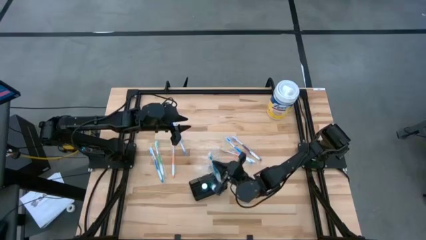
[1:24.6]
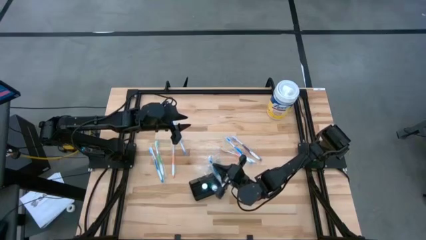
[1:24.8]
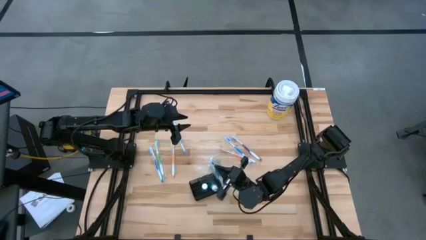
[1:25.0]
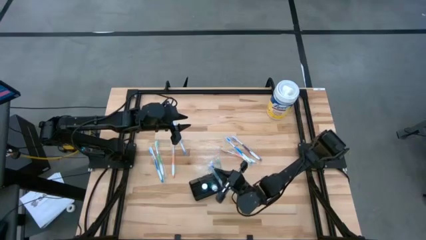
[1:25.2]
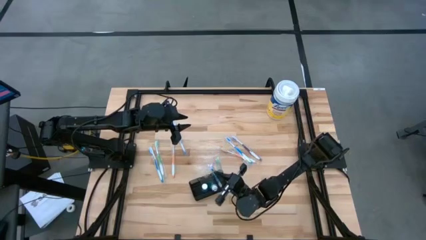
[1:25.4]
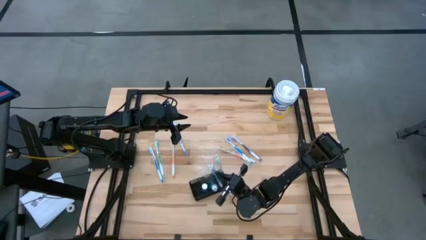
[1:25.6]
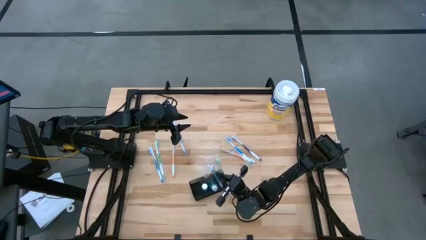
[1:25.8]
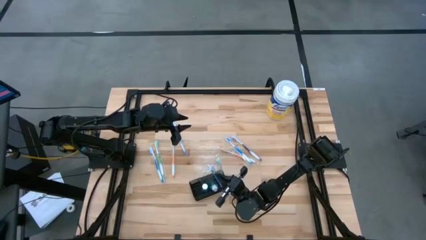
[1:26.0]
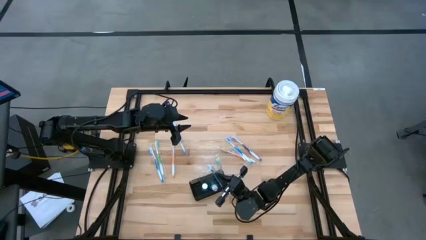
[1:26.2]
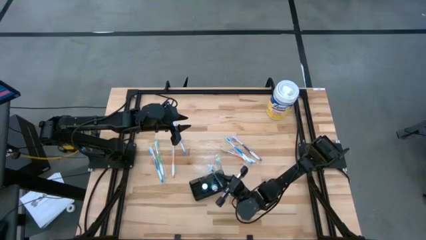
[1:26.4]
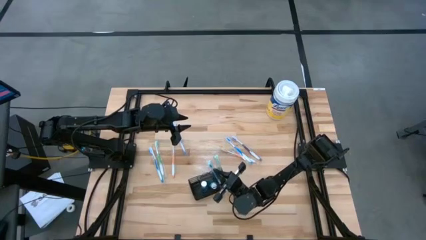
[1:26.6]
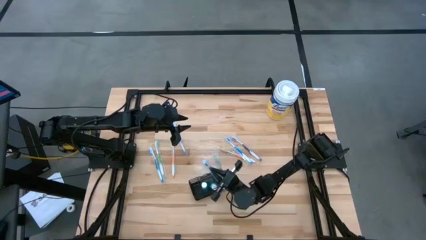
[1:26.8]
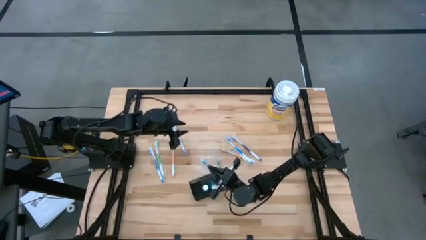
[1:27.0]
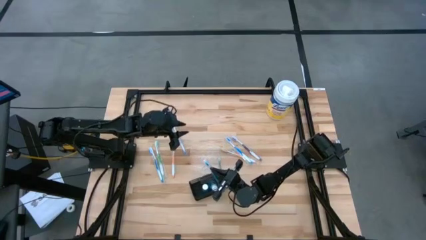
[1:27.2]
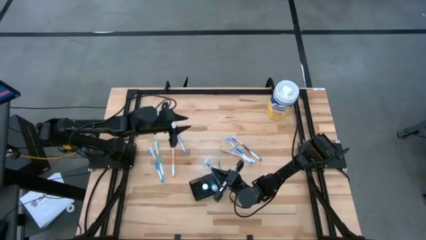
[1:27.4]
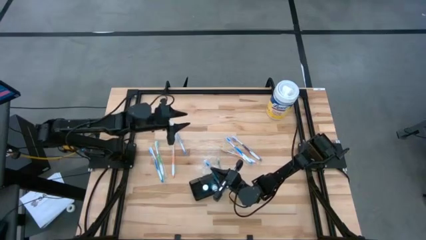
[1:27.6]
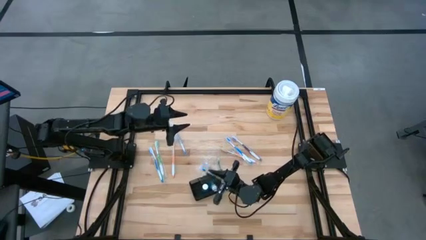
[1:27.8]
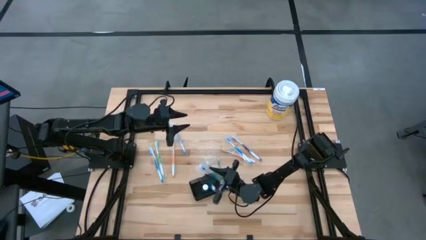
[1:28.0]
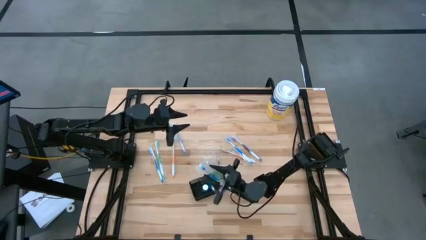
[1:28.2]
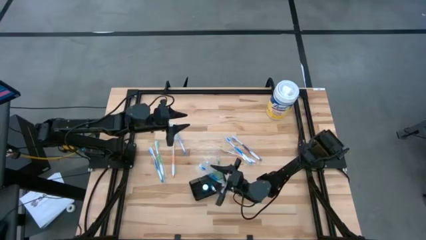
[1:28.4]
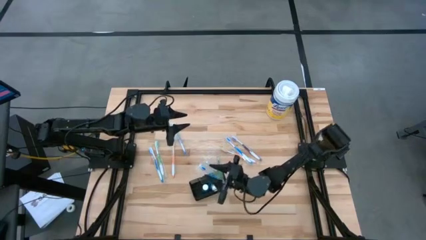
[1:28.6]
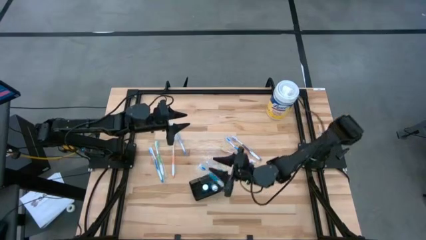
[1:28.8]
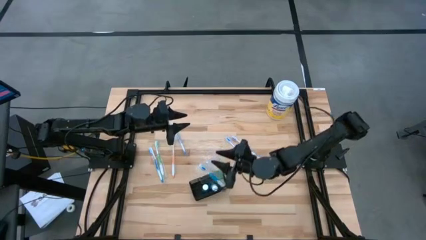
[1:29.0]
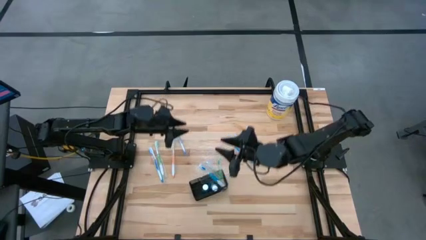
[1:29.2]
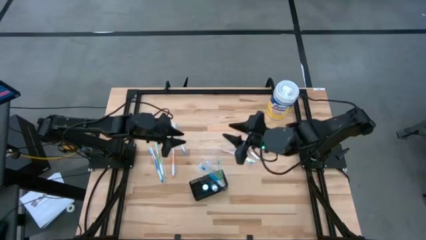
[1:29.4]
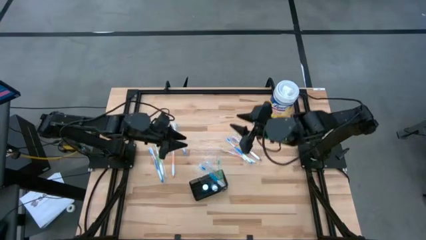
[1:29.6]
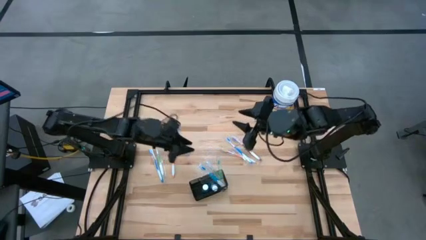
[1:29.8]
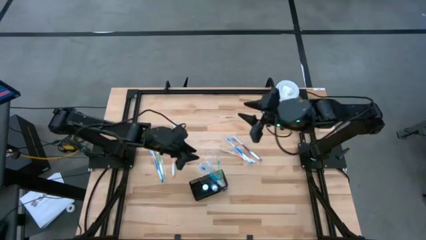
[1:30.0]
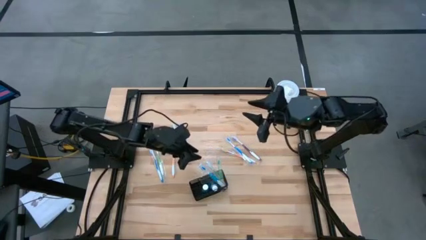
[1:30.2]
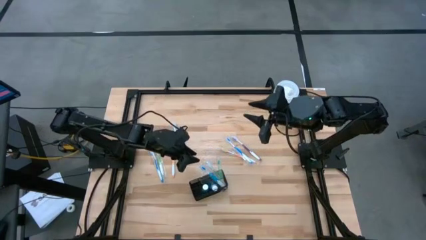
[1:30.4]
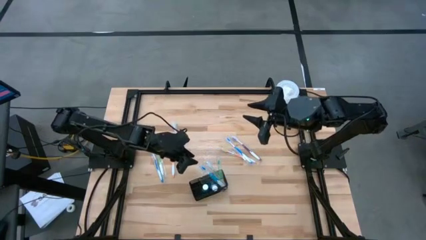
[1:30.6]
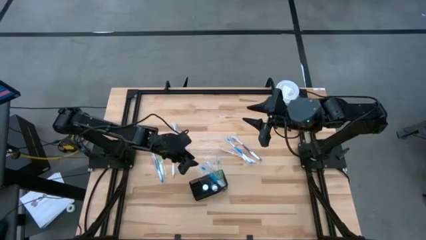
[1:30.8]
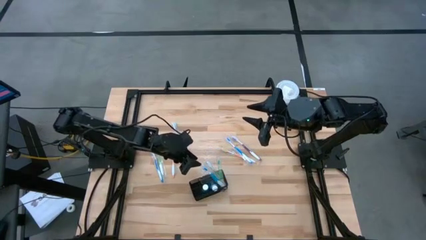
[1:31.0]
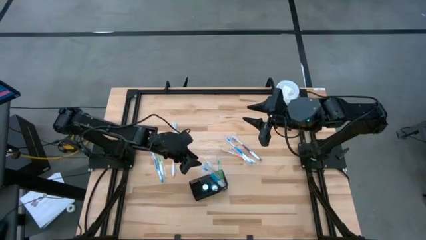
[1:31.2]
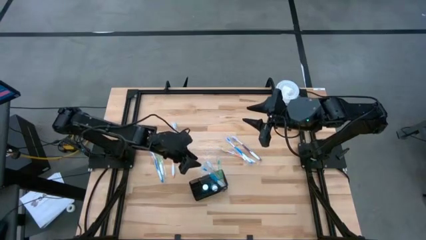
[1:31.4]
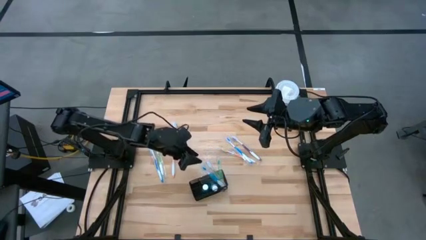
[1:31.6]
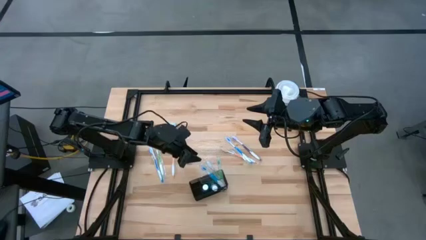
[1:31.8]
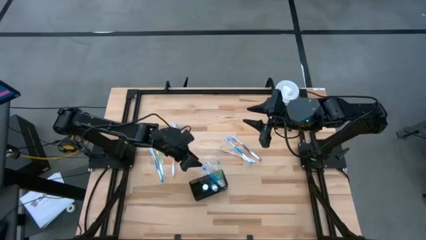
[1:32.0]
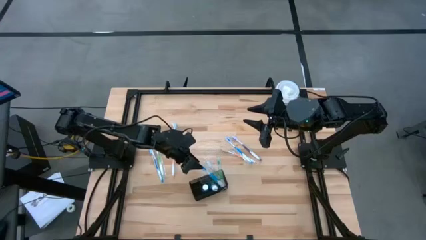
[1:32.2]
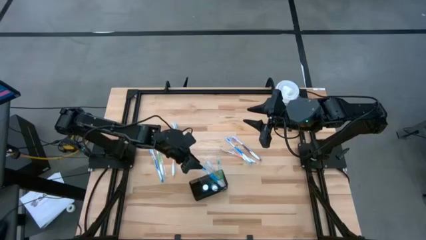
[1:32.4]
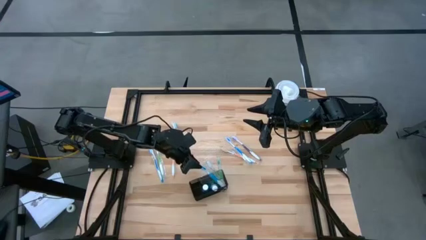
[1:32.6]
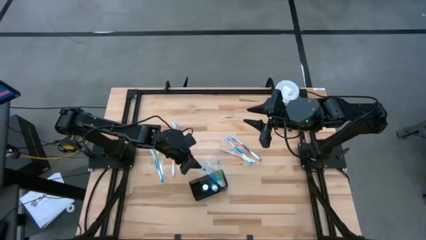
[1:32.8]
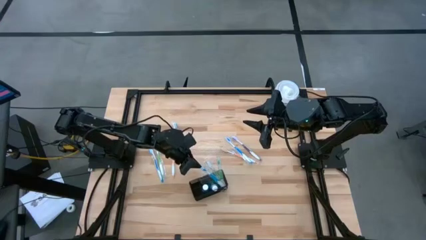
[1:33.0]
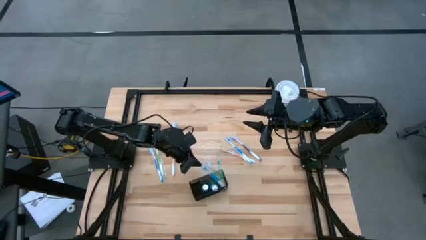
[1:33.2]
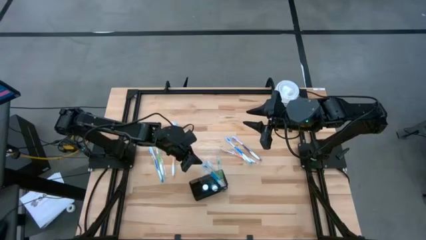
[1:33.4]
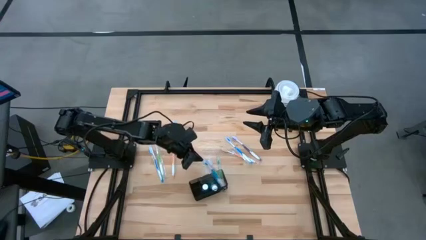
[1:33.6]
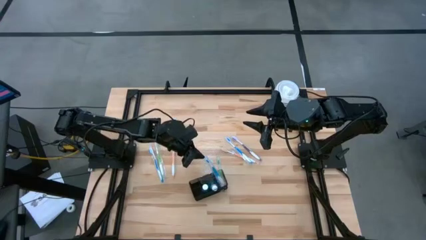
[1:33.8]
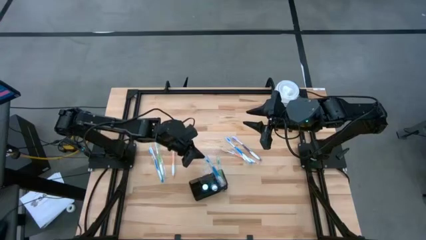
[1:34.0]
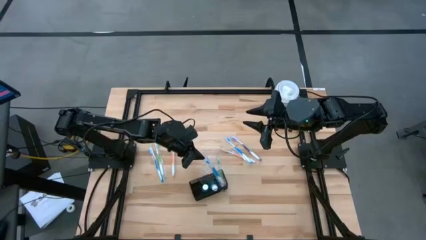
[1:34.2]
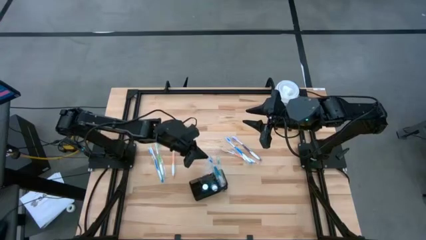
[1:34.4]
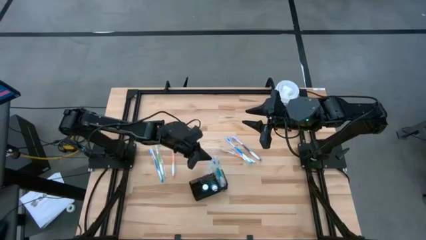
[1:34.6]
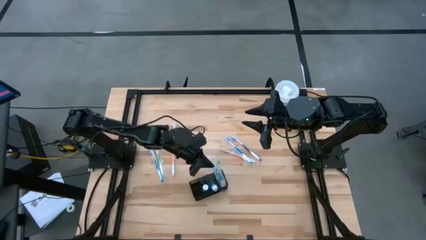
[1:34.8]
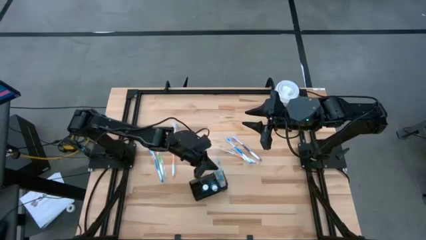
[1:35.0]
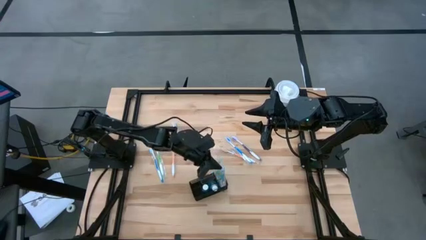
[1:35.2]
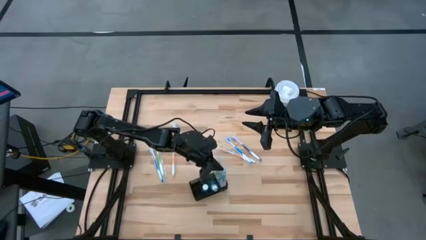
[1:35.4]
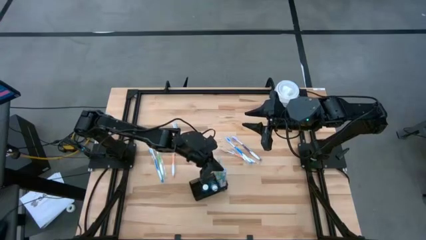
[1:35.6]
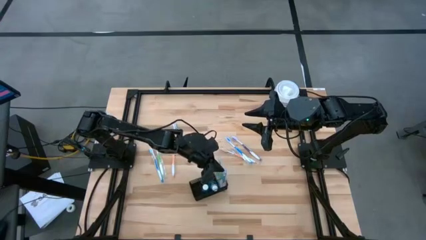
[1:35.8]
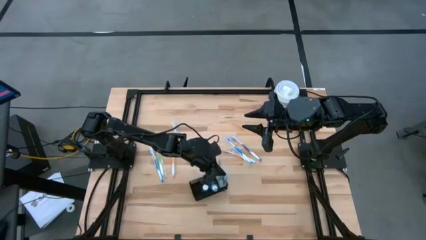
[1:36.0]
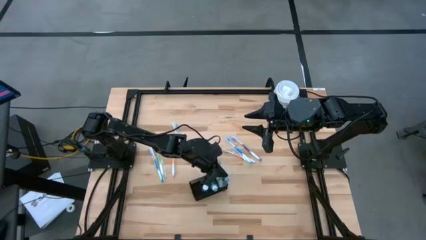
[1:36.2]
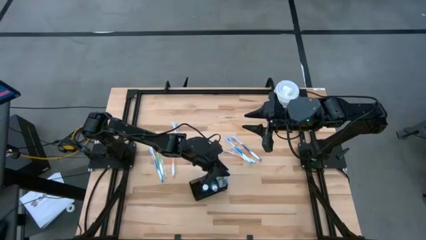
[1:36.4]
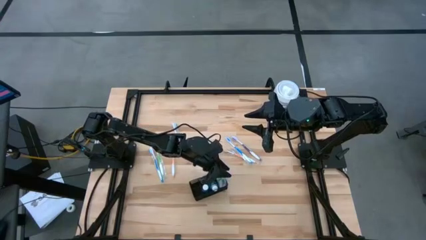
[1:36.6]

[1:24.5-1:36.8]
Task: Pick & Place toothbrushing station
Put the blue toothbrush into the mesh organizer

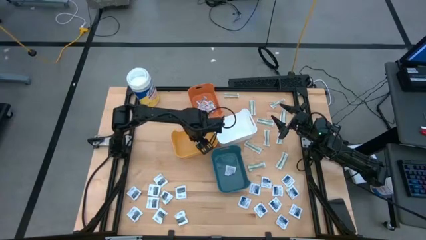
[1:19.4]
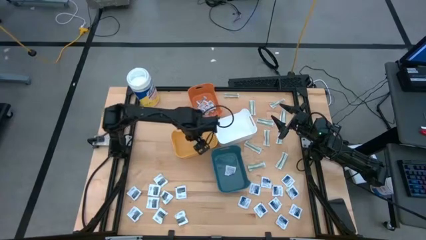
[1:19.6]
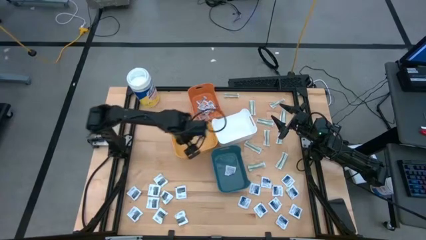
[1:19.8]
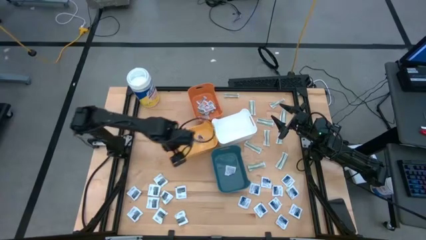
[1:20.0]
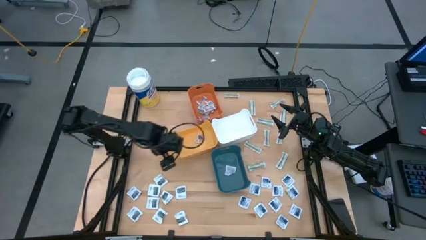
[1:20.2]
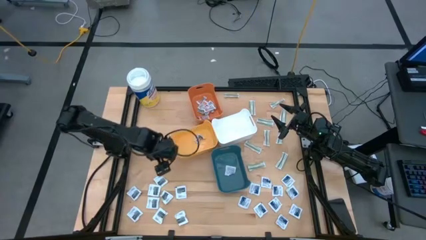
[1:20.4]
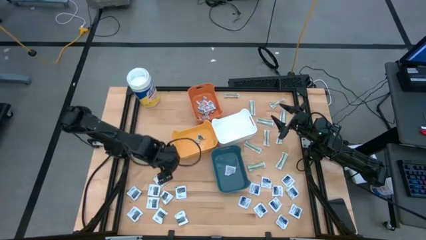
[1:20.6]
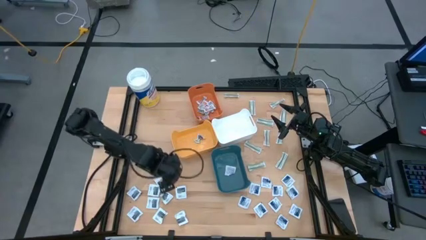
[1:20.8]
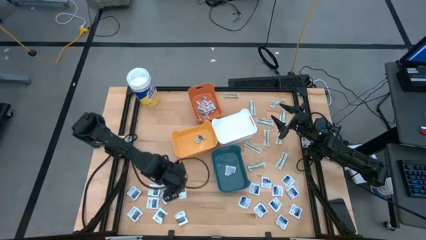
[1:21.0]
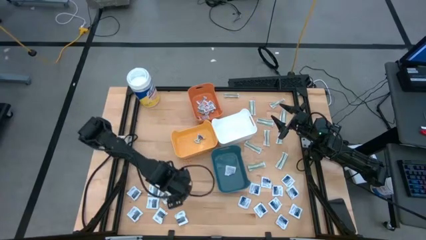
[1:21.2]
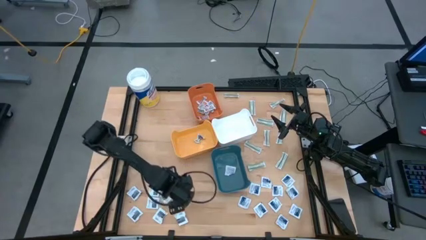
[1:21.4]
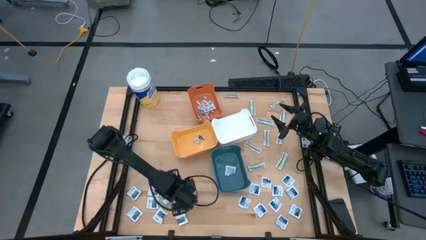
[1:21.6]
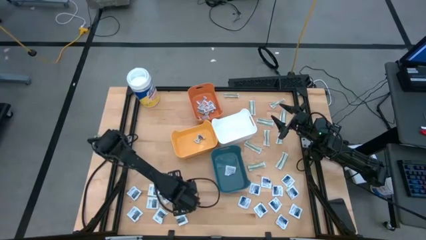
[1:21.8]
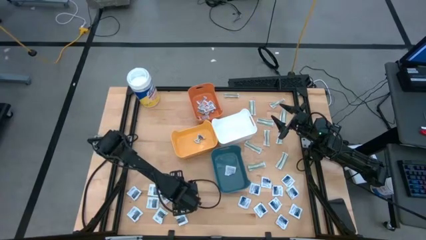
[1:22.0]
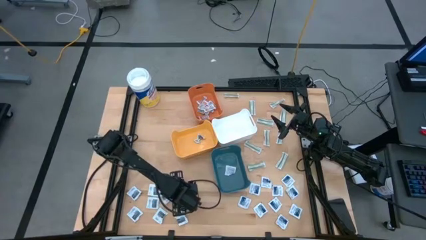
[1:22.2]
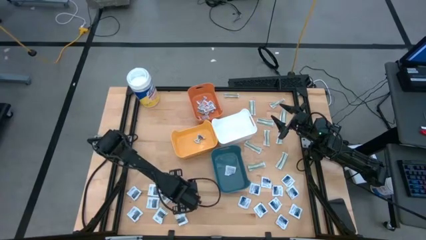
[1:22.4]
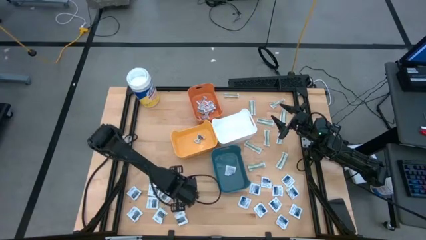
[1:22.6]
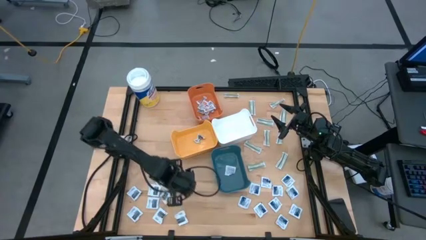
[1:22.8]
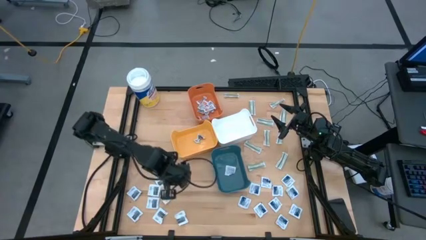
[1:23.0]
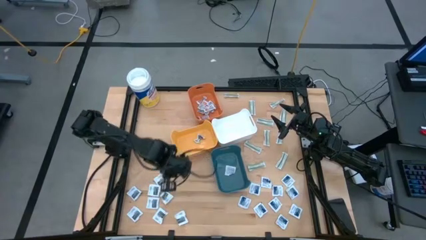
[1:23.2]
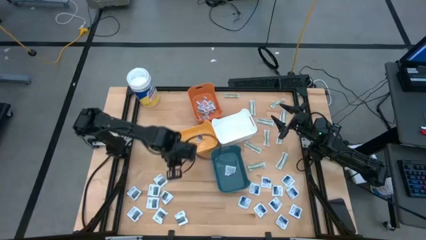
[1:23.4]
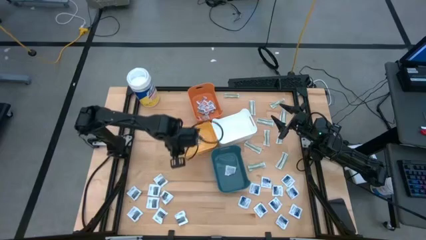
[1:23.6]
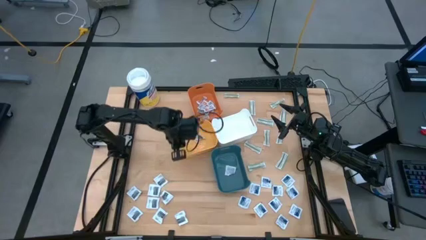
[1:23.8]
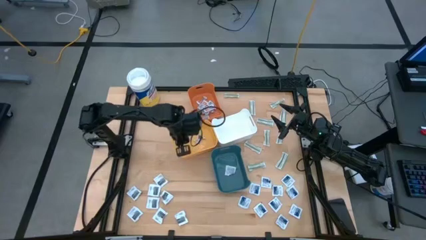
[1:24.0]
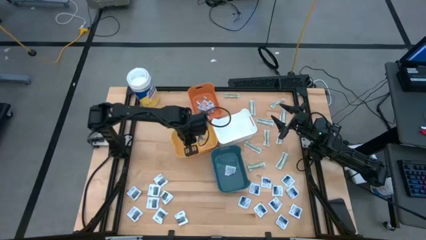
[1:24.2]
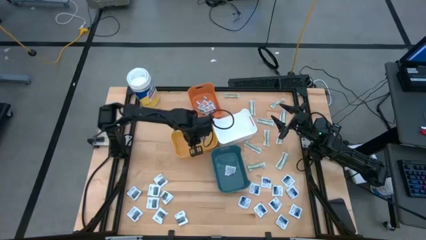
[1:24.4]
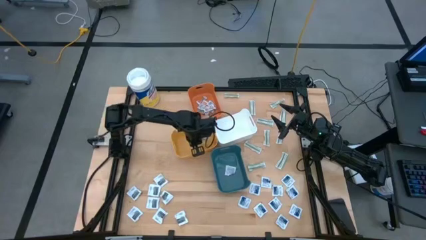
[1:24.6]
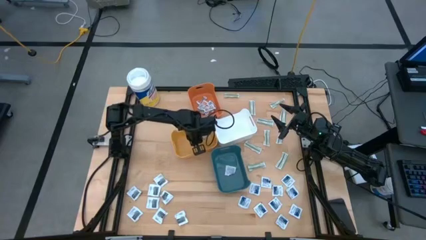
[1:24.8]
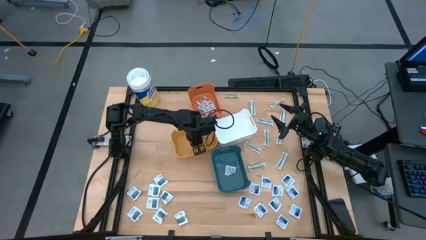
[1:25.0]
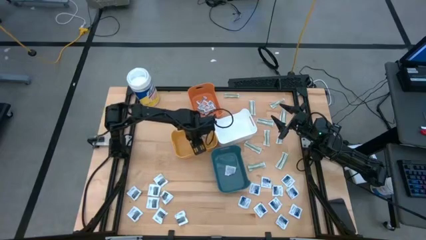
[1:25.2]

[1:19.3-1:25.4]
Task: Pick & Place First Aid Supplies
Put the black towelette pack into the yellow bin
